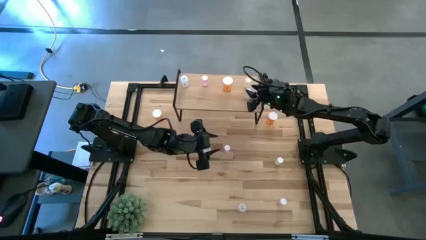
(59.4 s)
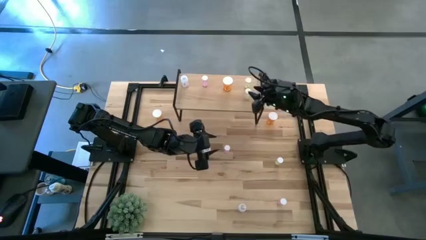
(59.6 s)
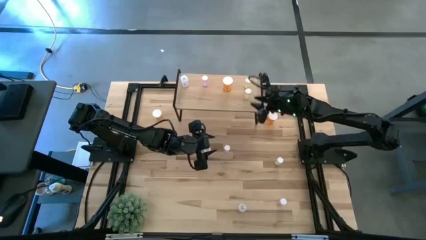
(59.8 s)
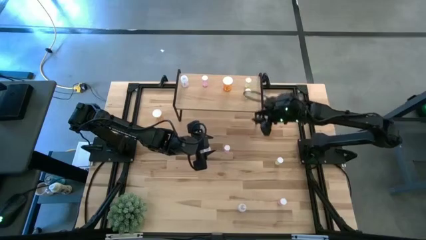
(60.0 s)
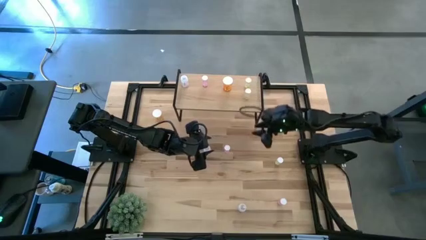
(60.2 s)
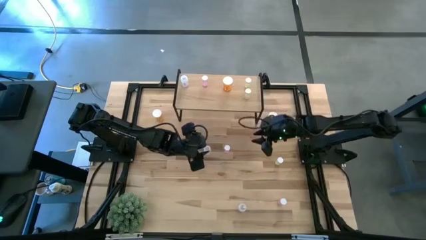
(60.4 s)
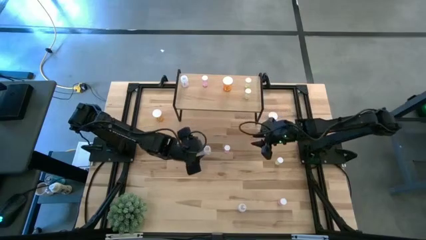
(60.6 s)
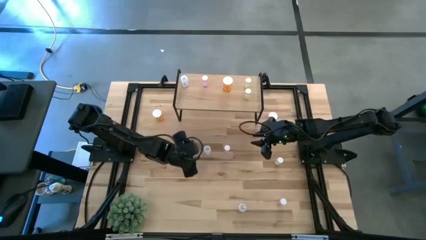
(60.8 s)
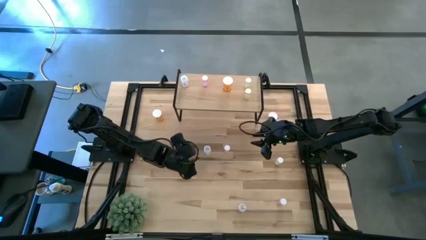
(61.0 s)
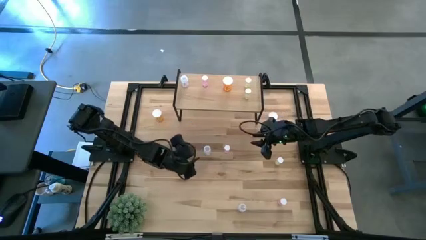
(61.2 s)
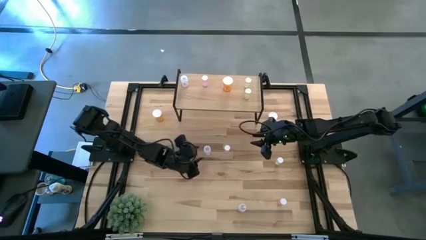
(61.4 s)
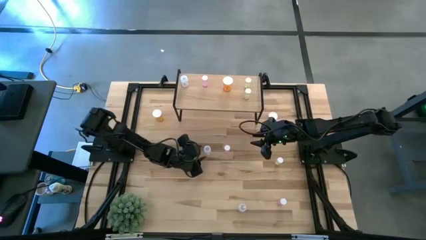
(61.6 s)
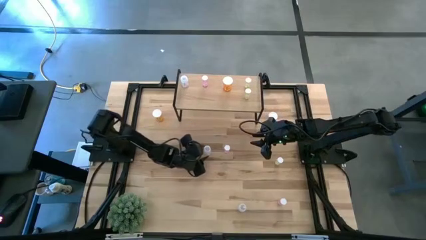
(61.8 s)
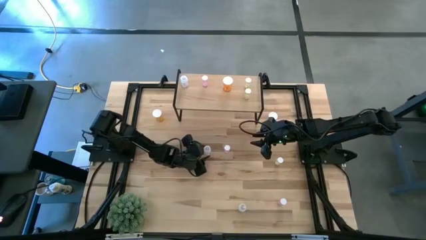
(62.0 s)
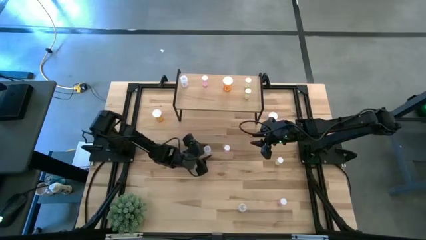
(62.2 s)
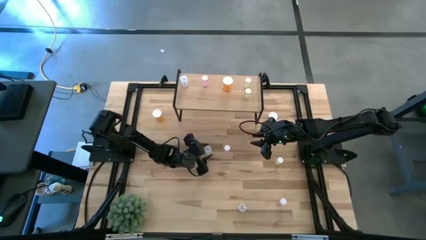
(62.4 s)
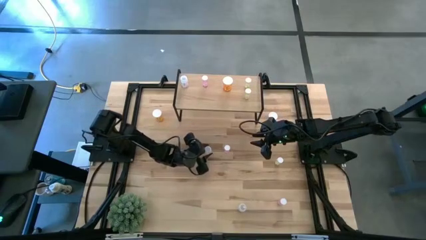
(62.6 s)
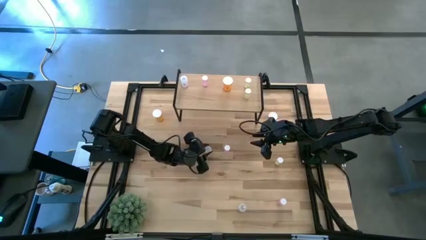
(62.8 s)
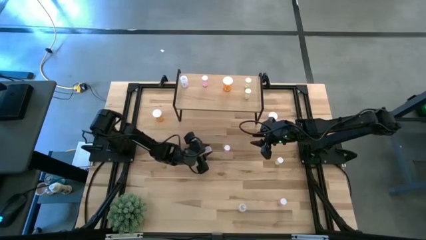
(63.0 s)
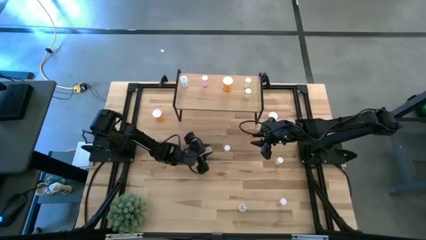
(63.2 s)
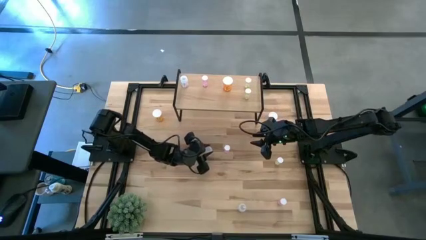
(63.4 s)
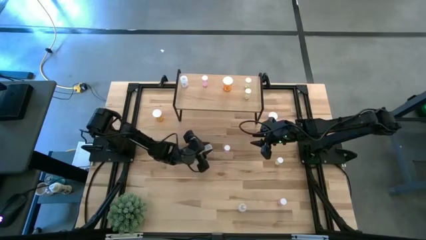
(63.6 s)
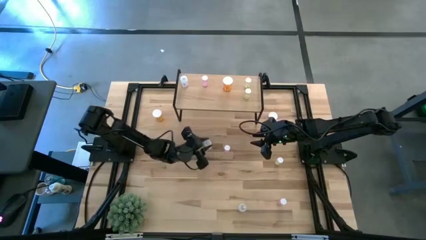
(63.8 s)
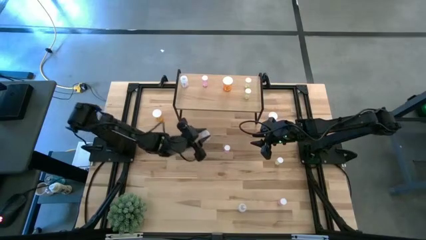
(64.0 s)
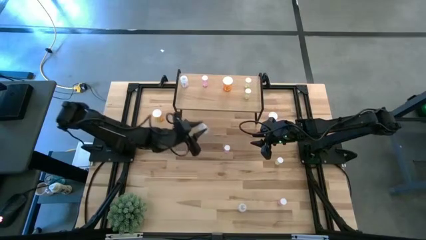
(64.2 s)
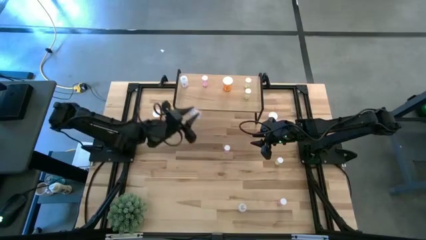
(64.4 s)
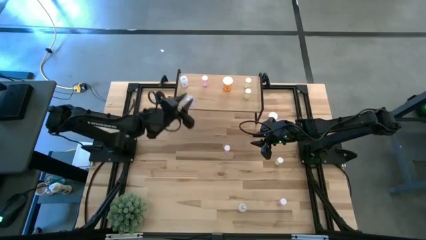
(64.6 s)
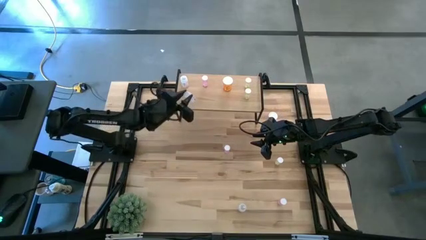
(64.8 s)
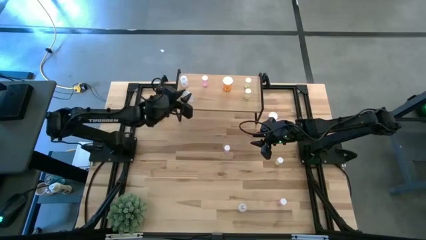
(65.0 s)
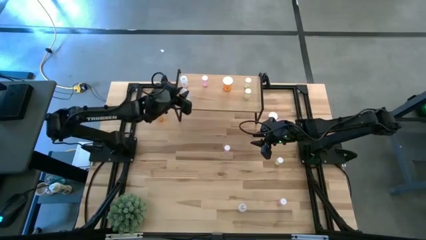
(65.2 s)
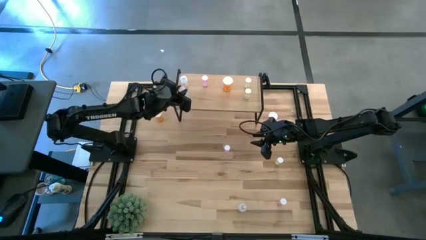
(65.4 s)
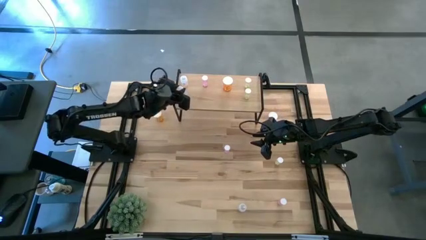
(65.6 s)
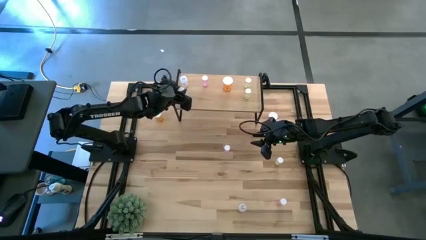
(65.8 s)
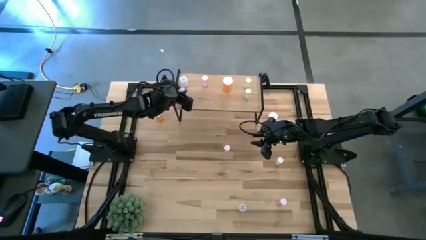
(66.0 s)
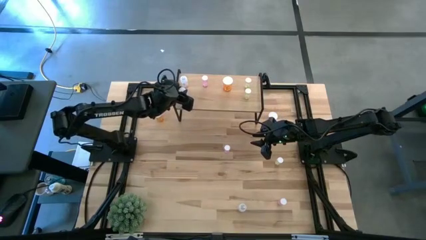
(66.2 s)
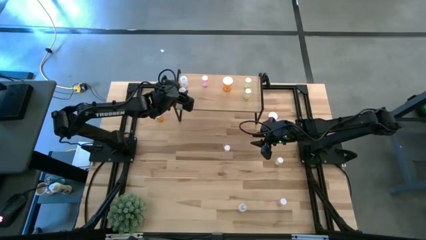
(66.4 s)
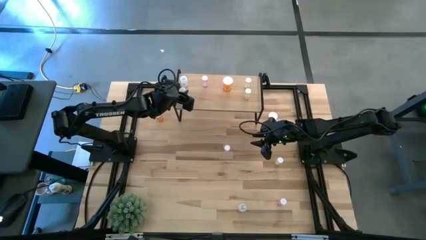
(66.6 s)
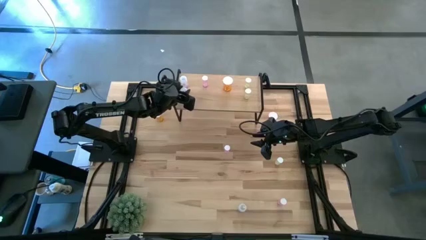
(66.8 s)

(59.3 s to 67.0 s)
Task: Pick and place medicine bottles onto shelf by color
Put the top transparent pill bottle on the shelf aligned with the other transparent pill bottle

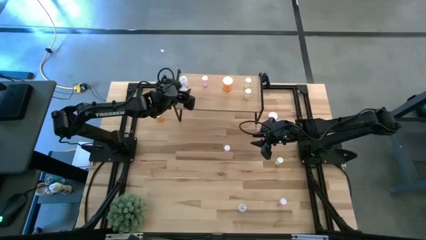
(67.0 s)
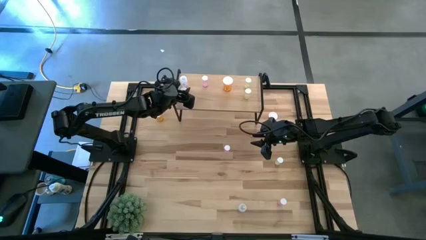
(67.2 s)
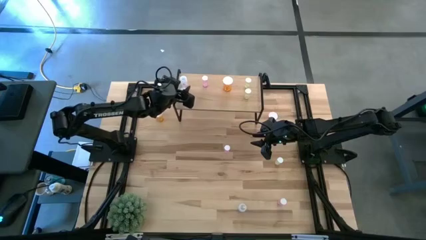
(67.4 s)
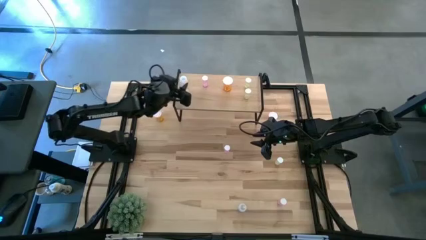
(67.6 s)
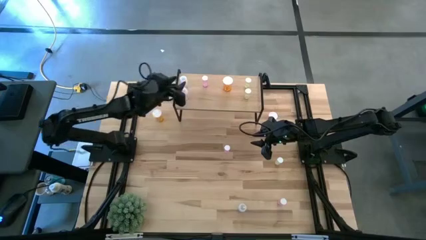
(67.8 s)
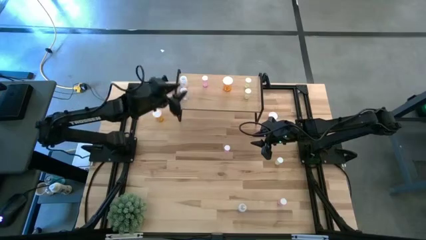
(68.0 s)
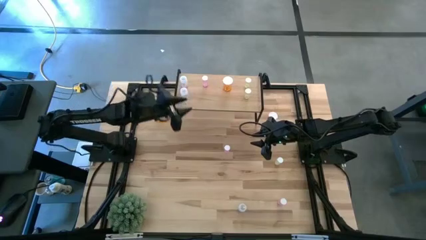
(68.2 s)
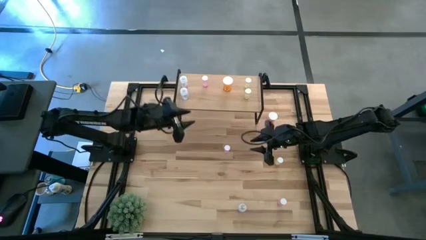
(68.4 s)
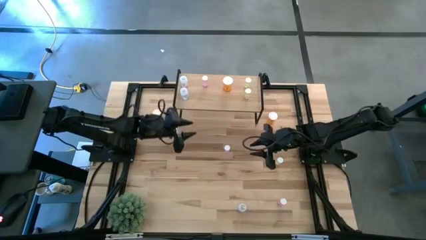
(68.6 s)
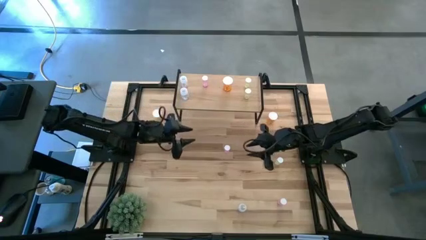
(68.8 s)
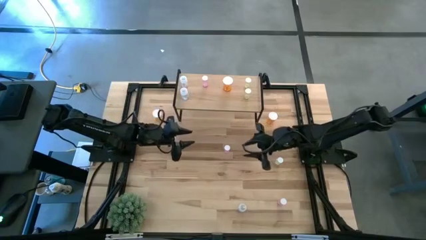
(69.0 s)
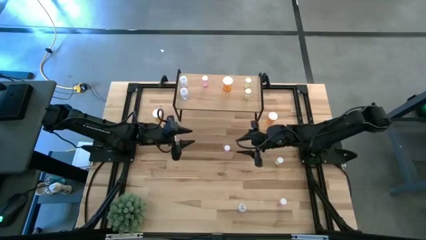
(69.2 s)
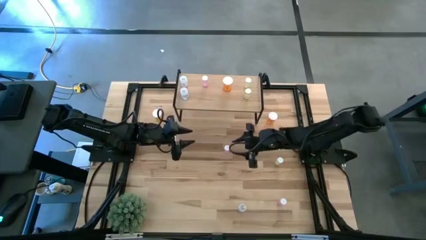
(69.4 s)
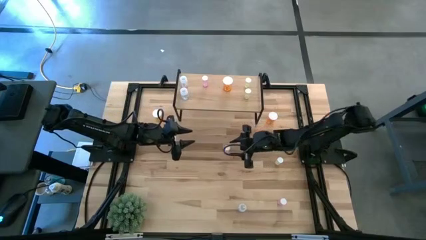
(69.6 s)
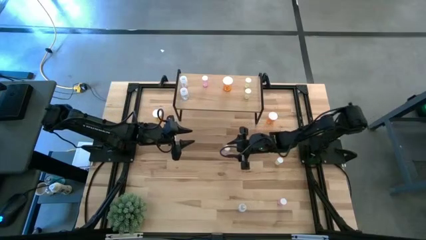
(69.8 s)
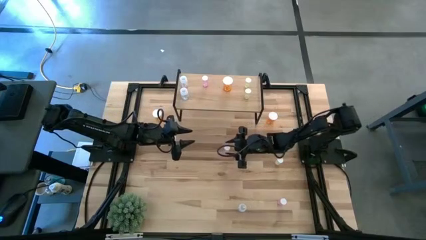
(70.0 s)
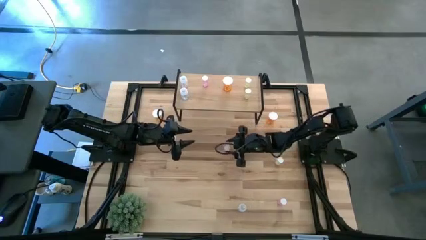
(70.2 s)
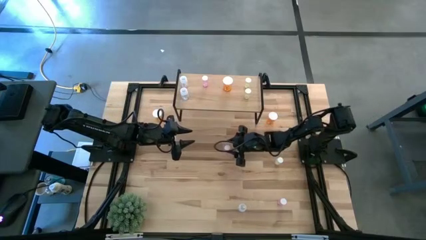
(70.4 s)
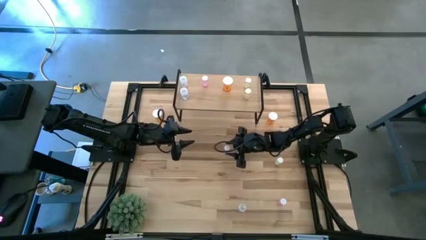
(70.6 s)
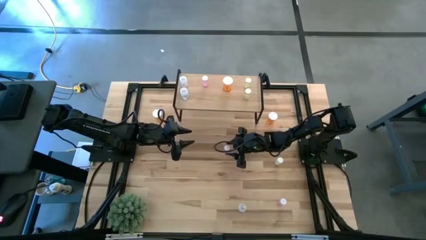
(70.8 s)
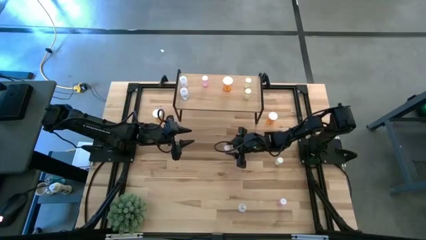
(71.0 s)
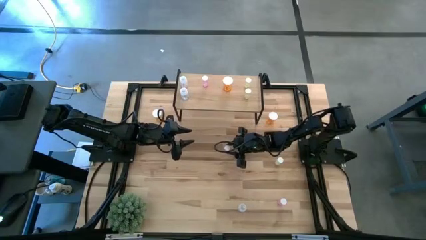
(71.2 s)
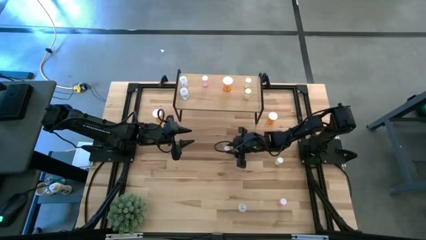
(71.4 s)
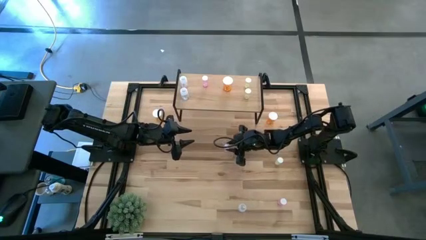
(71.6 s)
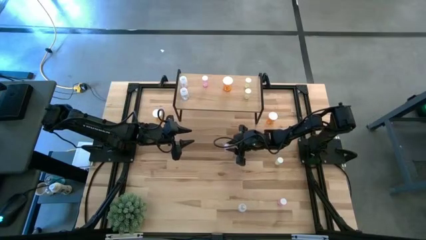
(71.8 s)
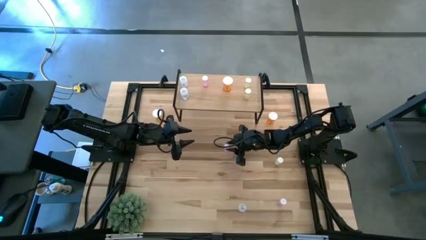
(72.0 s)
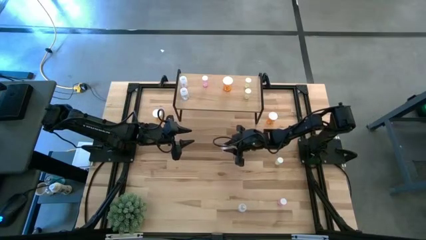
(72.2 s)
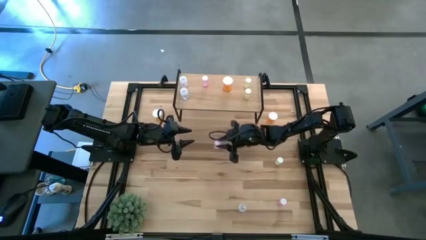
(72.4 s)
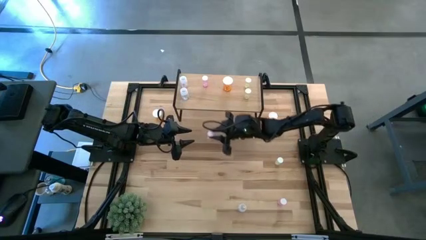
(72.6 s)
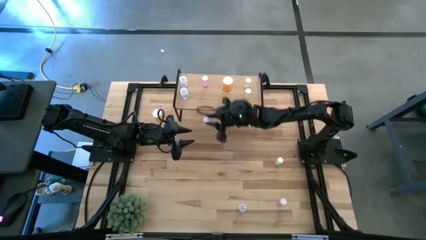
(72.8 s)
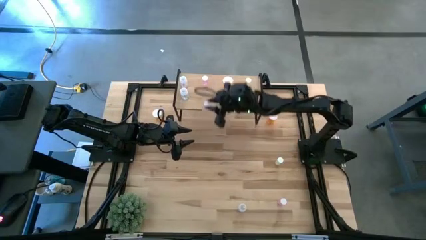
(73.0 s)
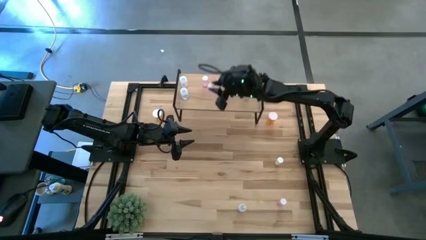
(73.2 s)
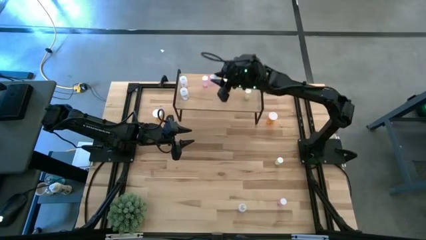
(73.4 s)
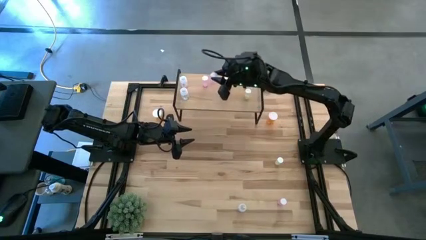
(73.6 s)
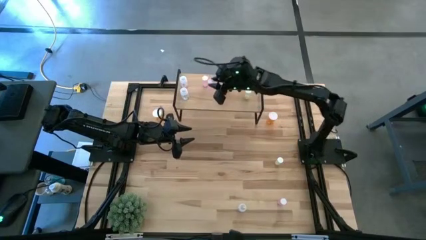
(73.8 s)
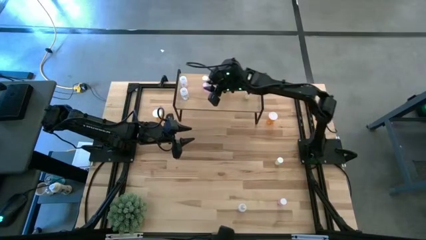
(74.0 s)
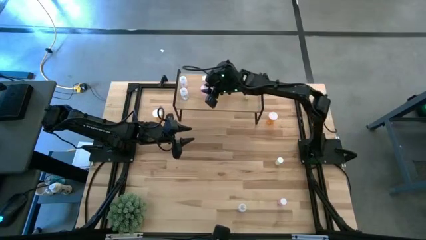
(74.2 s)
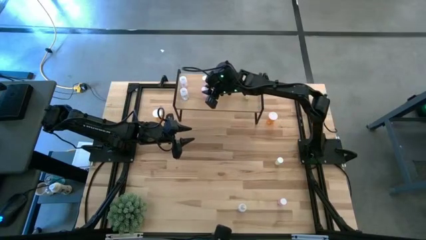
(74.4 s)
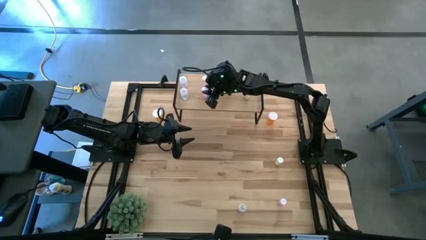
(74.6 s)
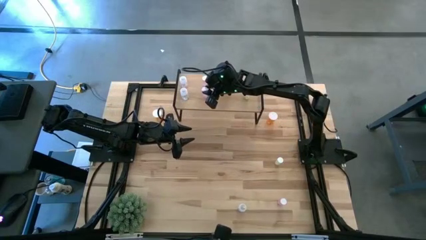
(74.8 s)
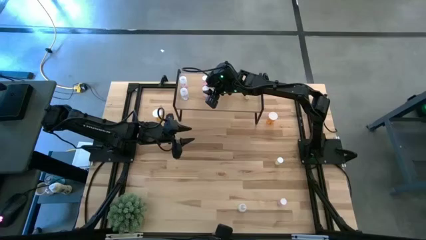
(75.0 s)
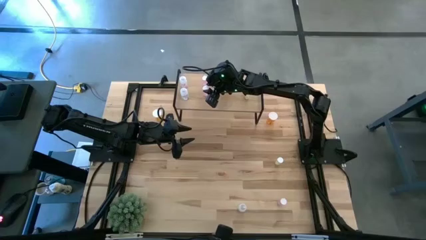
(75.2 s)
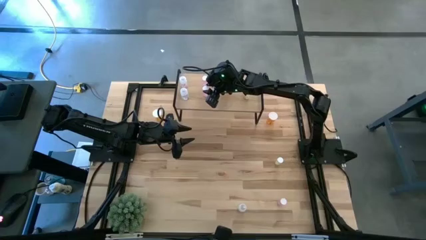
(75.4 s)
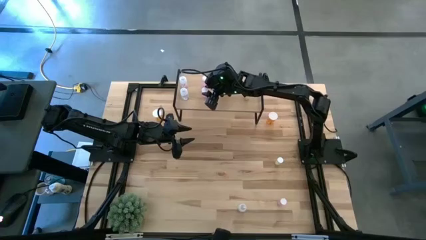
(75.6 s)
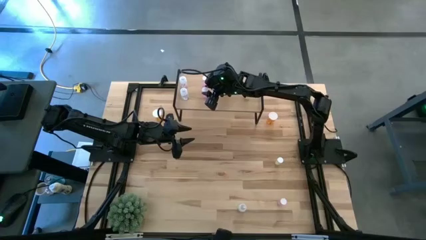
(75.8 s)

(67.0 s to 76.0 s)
Put the top pink pill bottle on the shelf aligned with the other pink pill bottle
